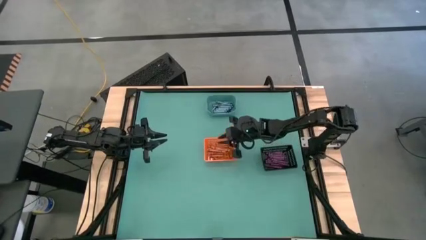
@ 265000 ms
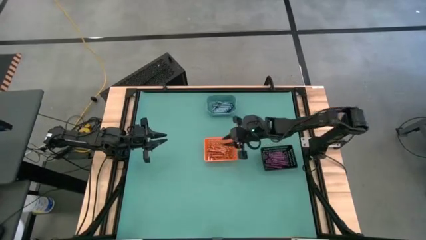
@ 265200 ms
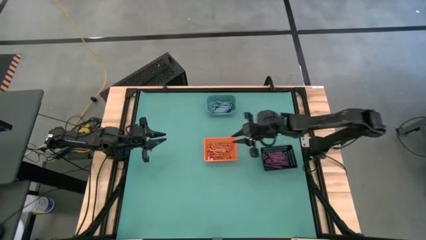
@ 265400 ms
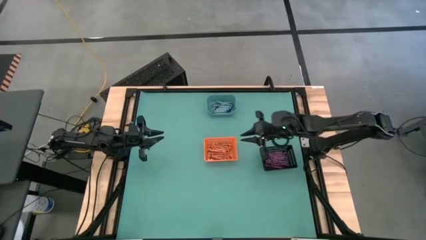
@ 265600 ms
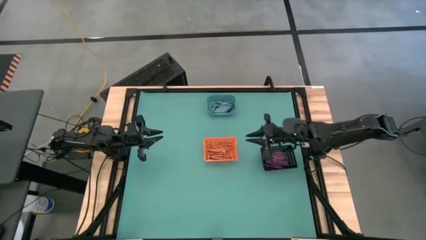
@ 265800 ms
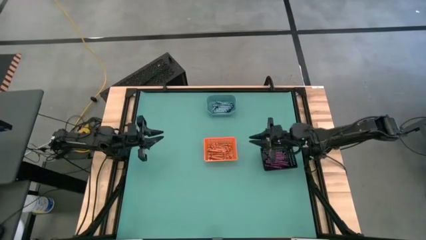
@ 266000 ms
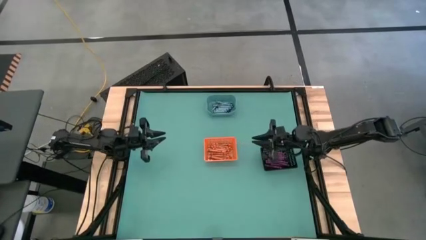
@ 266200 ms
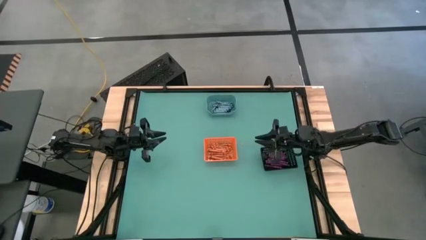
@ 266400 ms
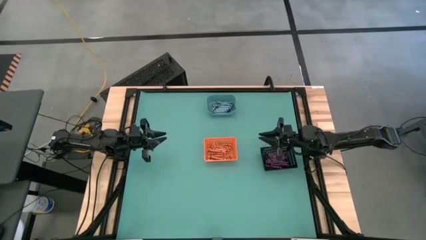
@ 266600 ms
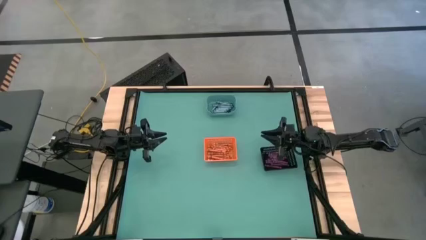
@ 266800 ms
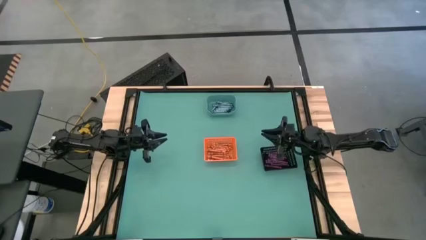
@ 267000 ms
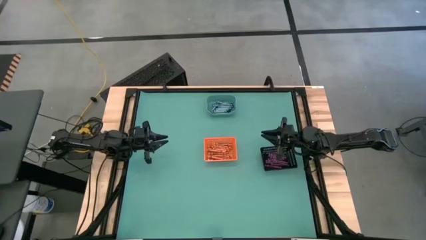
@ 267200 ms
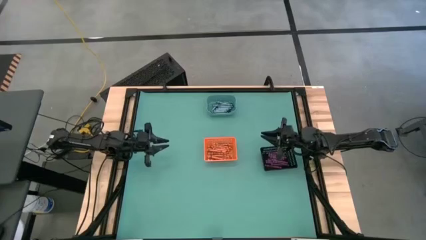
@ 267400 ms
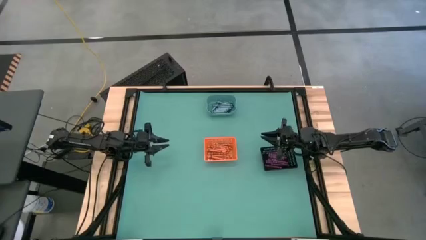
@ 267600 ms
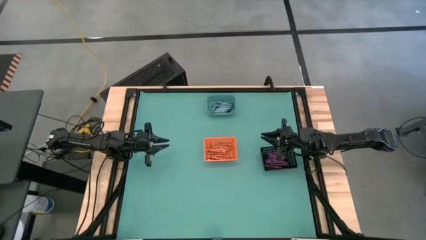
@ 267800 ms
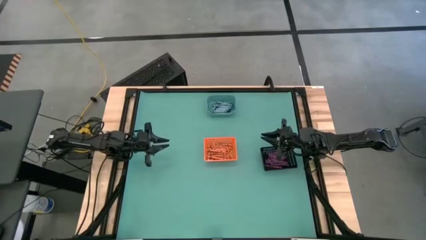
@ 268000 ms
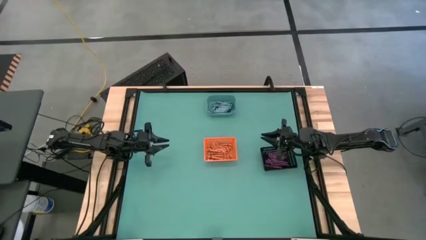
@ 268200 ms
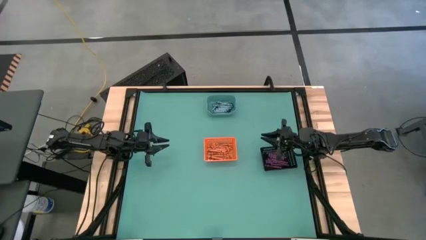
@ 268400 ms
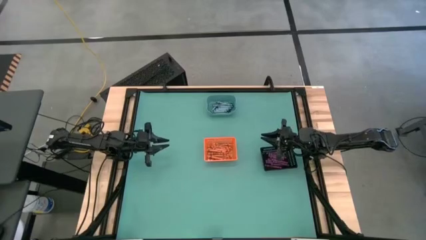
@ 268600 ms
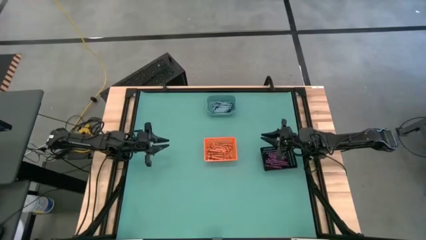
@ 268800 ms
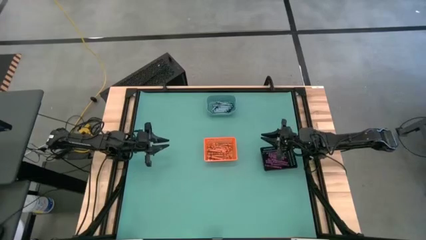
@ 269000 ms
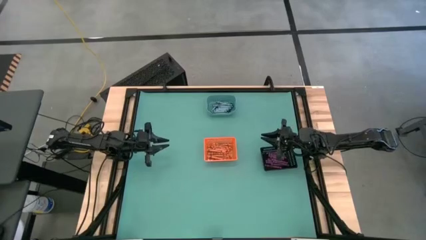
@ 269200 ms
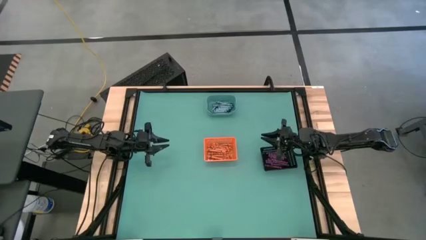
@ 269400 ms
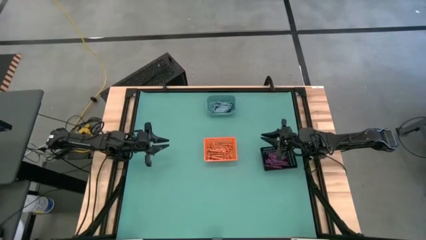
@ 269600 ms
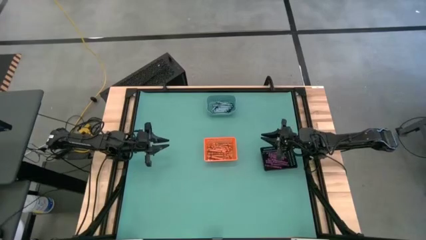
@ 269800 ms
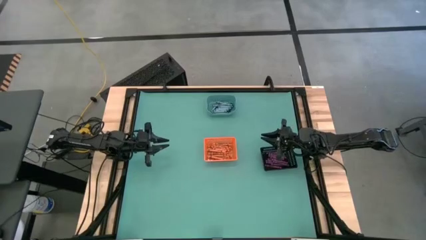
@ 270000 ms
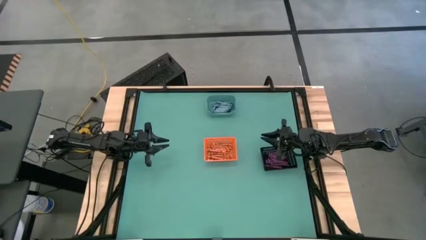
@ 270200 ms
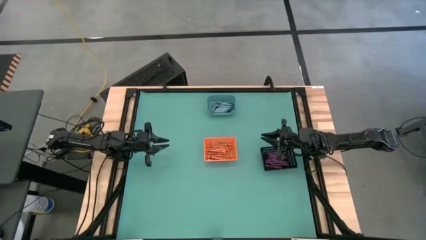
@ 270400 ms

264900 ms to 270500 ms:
Task: Sort crayons
Return to Home Position

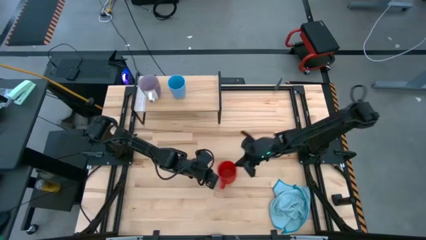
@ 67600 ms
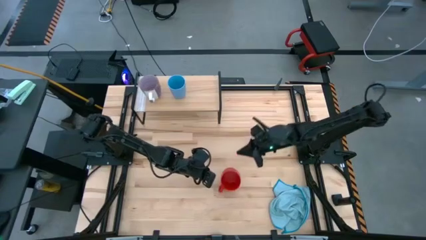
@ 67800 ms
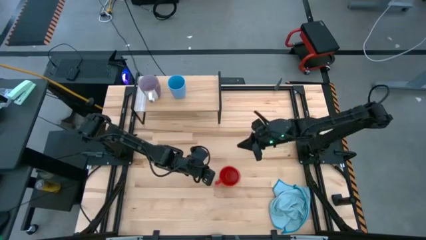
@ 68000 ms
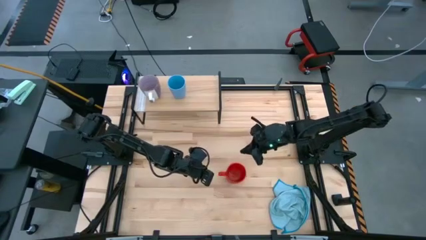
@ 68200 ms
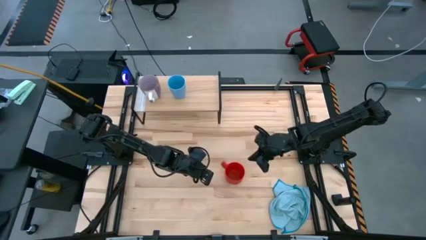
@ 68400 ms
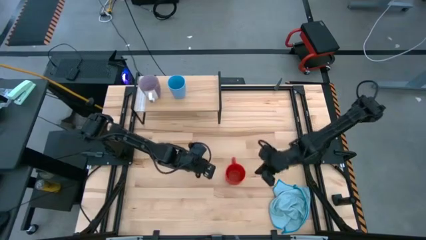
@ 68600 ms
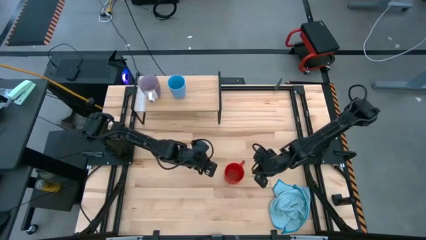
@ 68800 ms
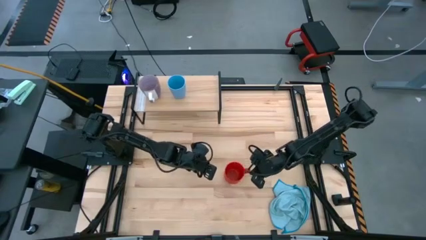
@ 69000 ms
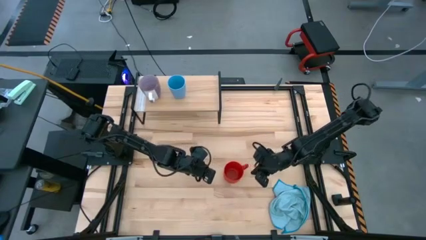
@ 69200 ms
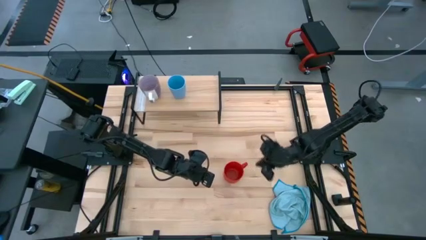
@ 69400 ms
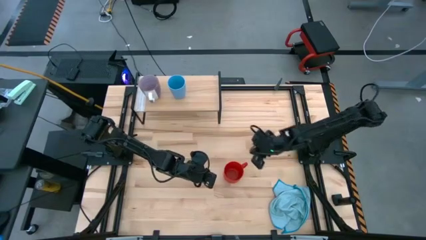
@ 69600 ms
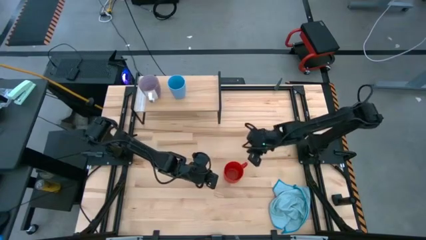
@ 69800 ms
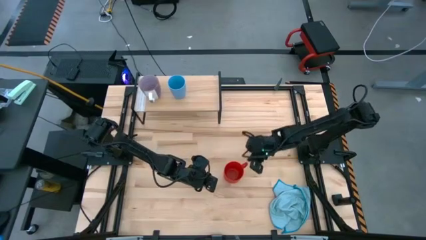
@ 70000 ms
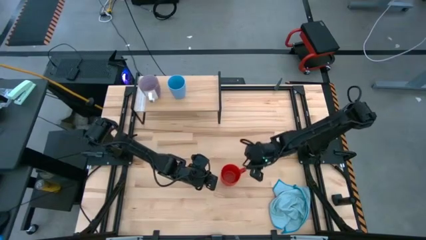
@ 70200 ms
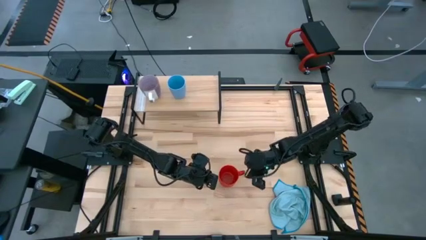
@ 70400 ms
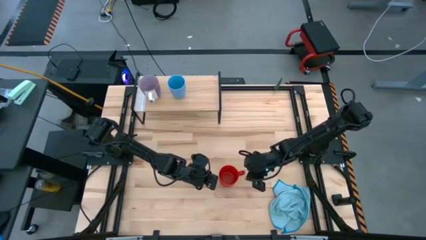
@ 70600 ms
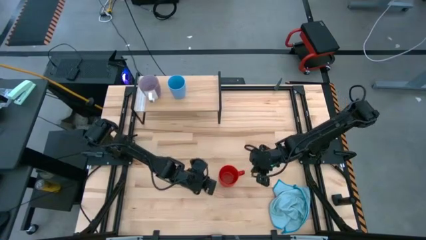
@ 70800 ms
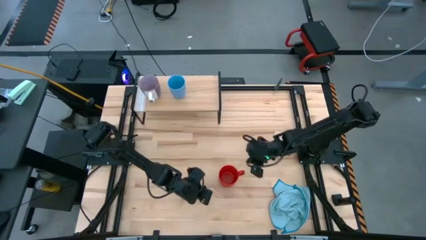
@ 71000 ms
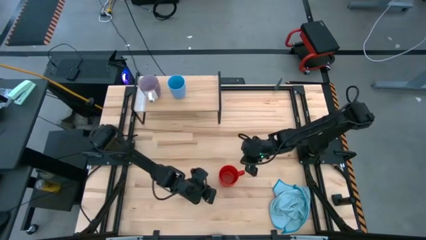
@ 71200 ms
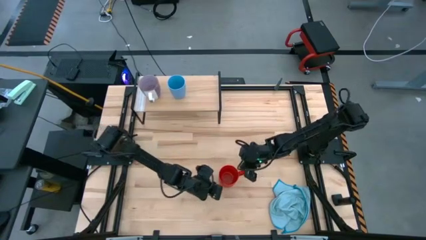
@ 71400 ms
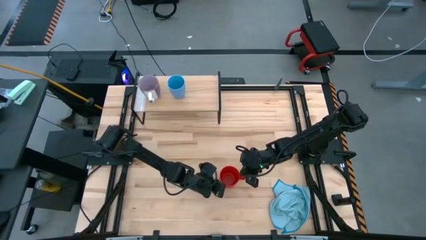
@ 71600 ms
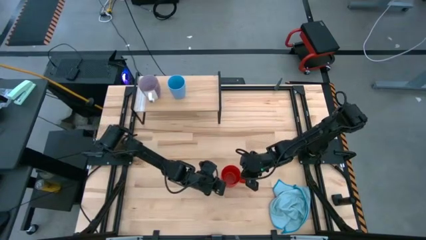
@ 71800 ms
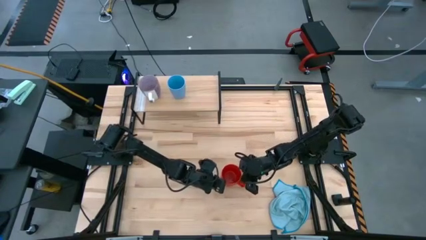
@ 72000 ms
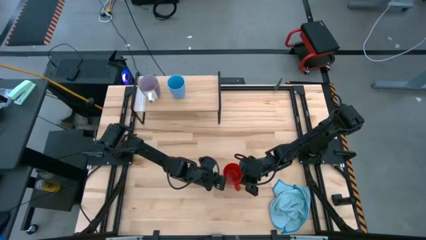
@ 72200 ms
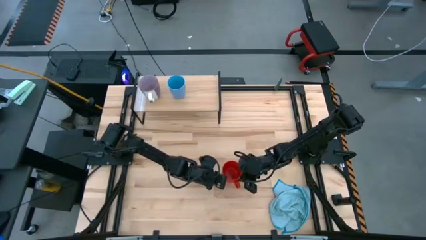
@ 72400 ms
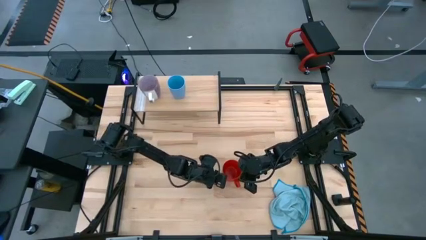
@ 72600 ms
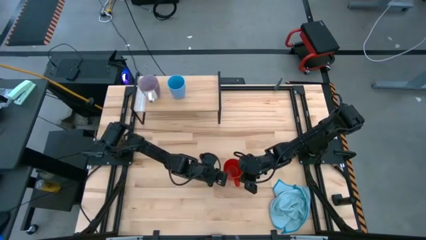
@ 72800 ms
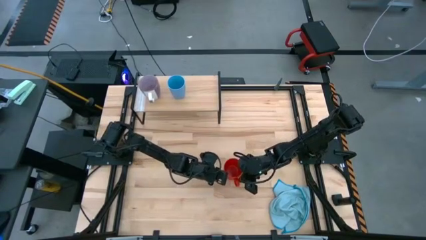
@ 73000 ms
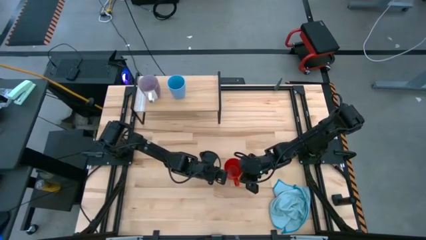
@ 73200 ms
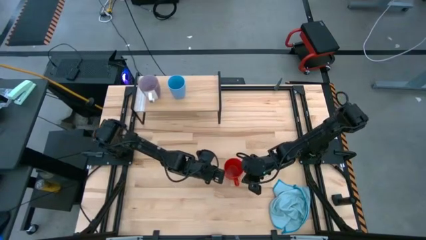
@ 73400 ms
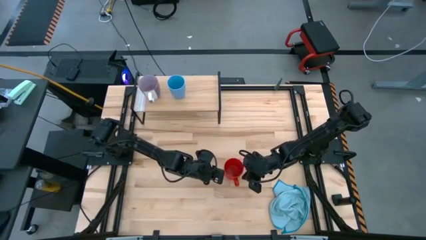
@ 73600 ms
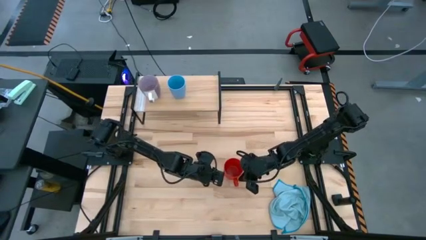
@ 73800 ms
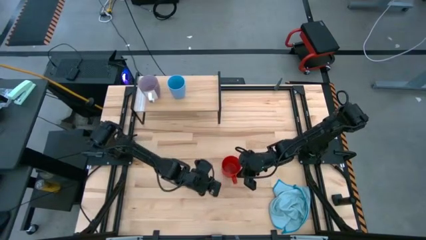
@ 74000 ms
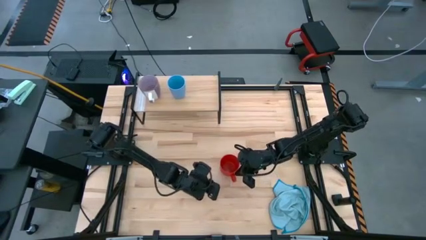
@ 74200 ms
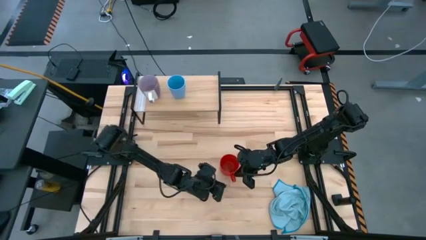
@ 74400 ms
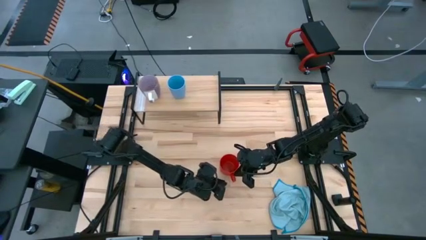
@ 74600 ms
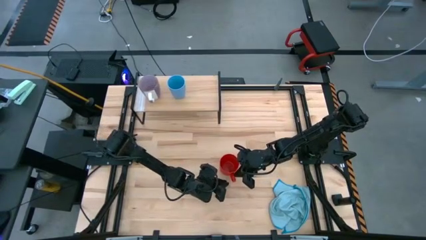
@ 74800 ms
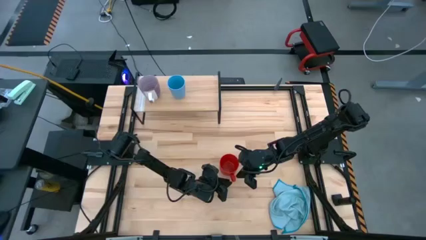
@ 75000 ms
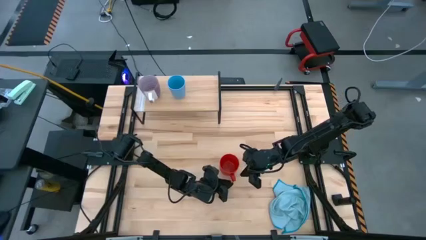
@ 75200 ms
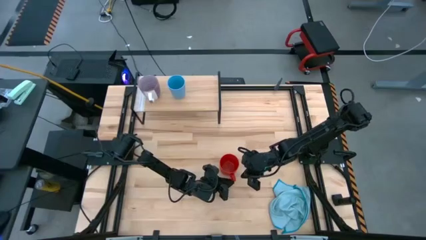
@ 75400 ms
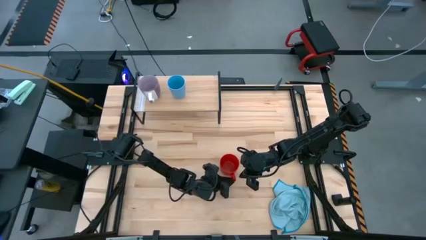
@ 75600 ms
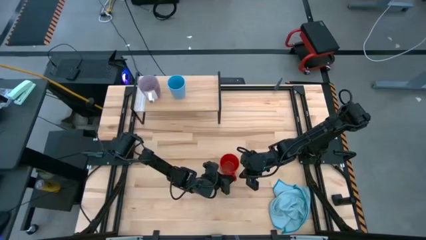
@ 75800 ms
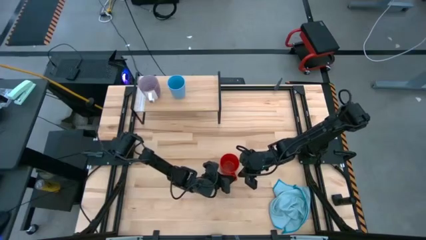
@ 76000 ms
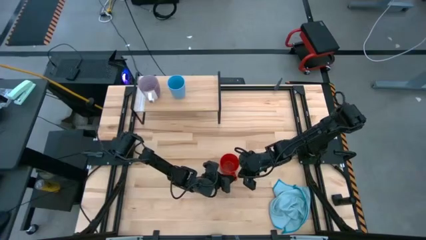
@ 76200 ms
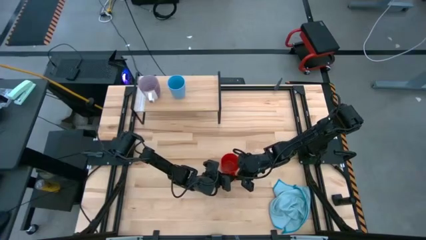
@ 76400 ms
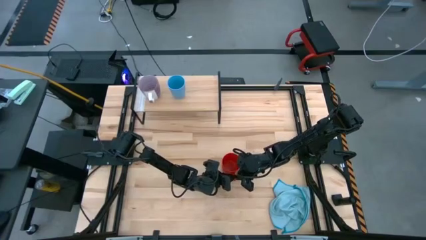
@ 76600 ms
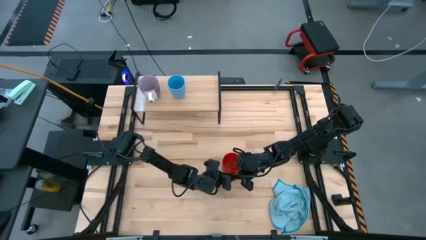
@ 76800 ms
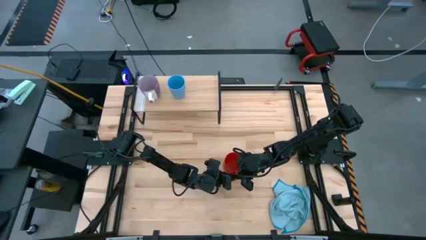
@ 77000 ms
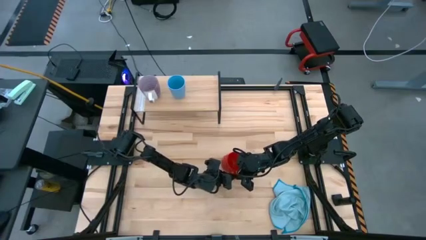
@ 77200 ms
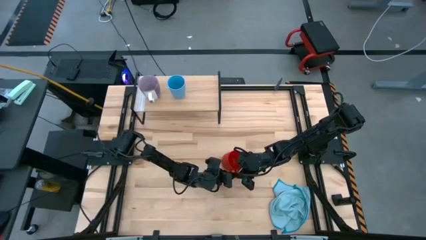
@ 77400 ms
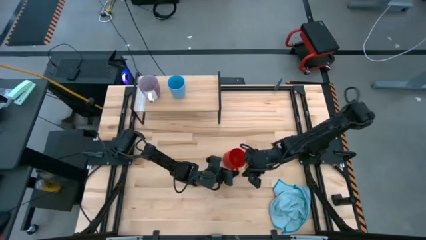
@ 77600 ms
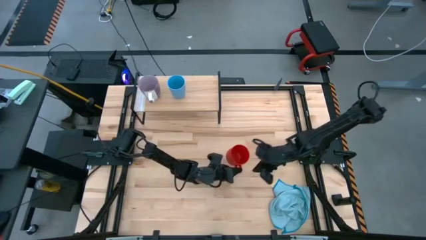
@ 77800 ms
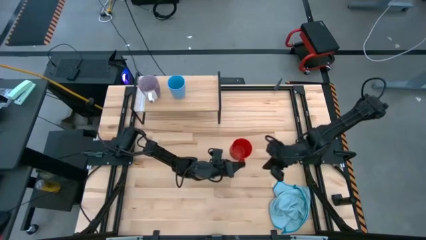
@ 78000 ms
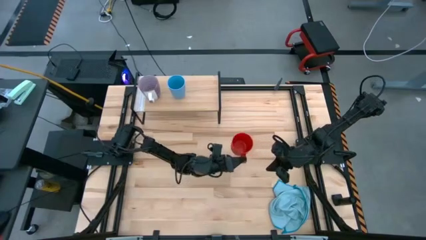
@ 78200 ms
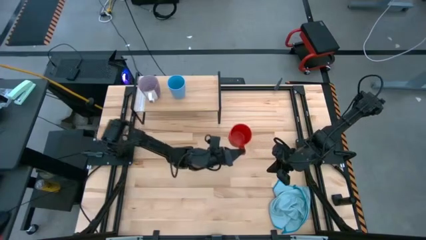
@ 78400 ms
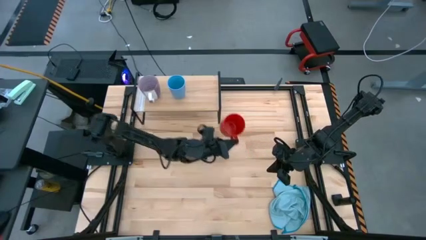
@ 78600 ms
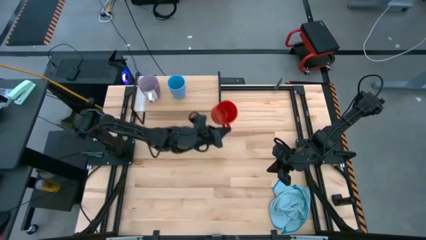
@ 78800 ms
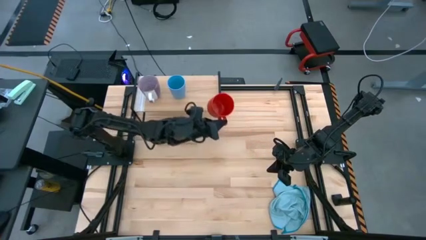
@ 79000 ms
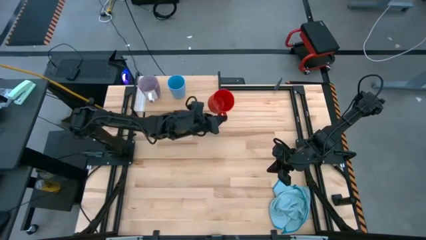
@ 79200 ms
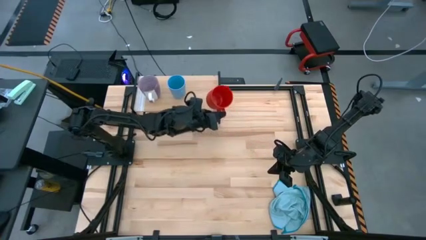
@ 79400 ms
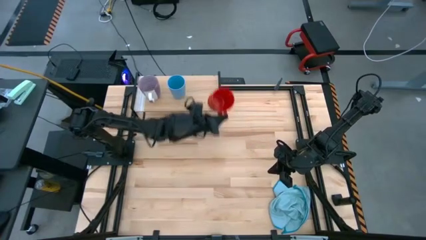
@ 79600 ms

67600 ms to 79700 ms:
Task: Stack small to large cups/mugs on shelf
Put the red mug on the shelf
